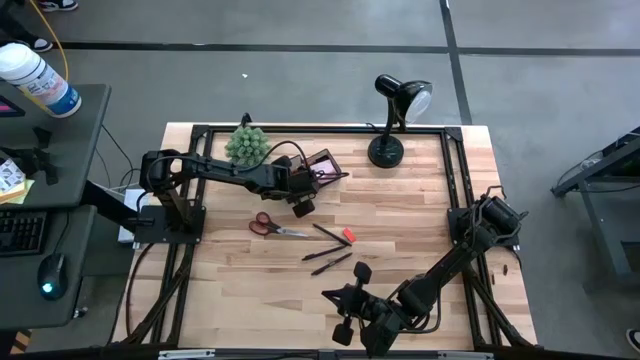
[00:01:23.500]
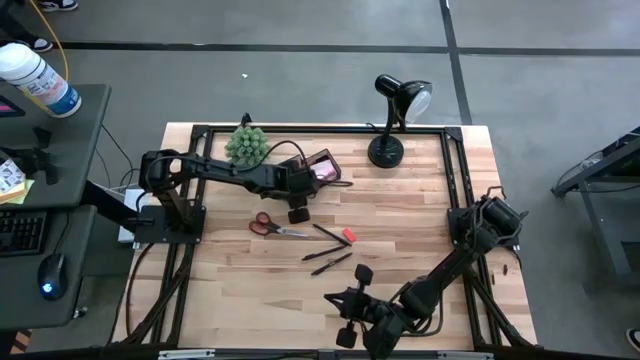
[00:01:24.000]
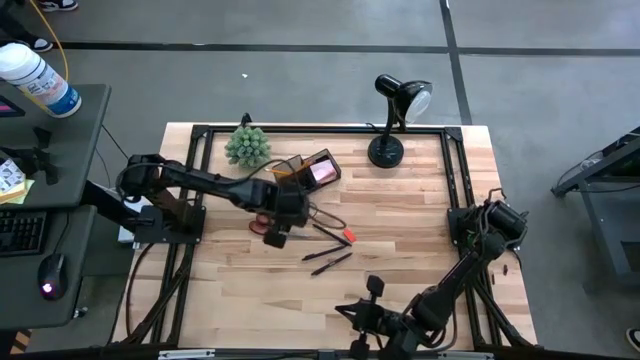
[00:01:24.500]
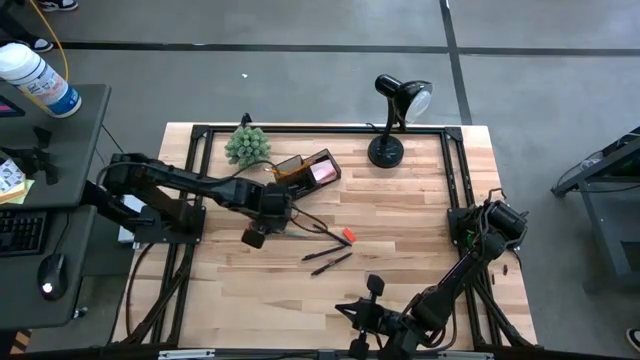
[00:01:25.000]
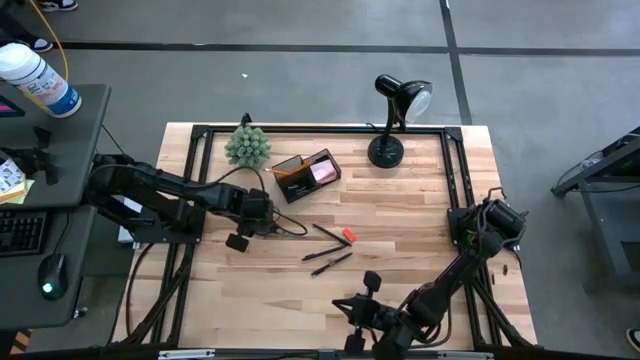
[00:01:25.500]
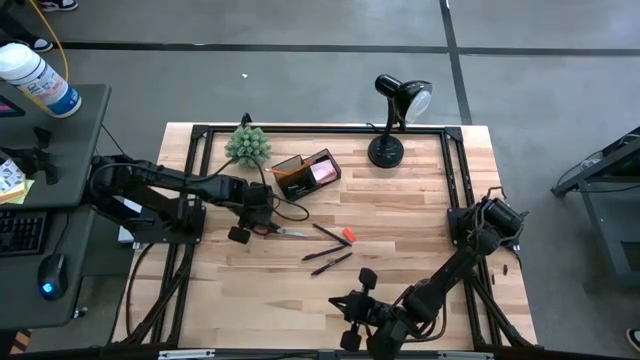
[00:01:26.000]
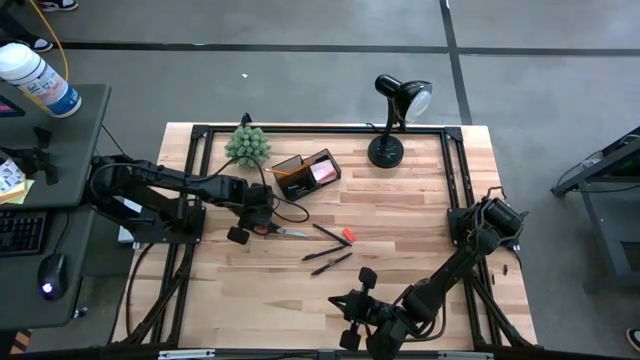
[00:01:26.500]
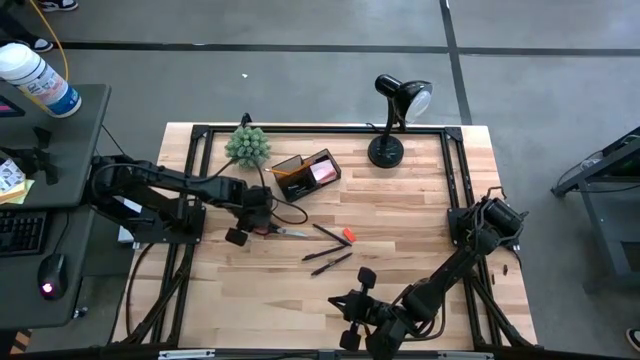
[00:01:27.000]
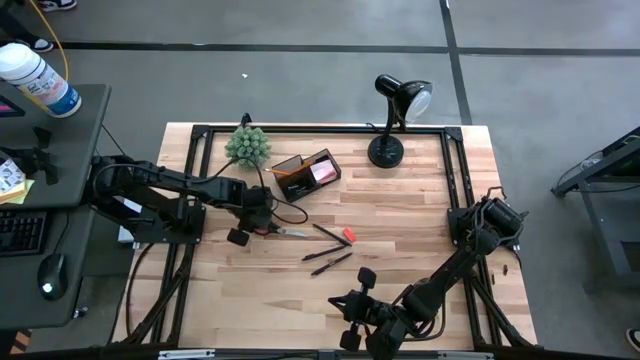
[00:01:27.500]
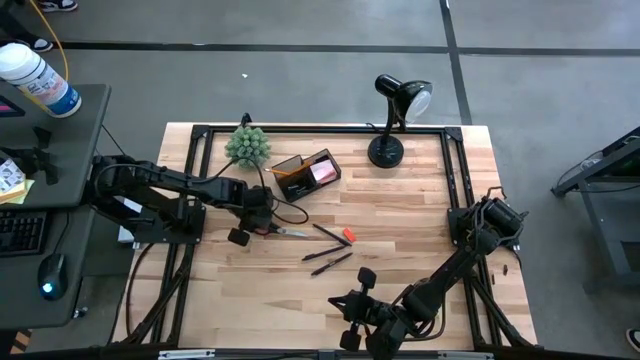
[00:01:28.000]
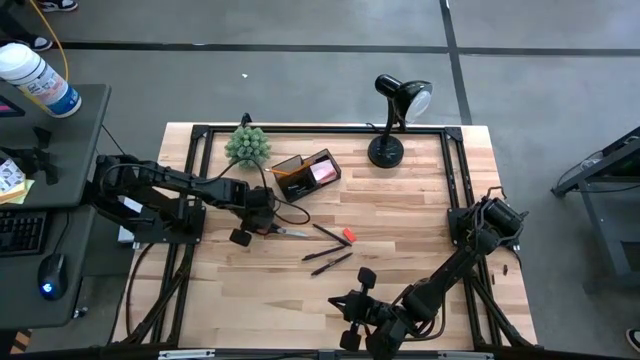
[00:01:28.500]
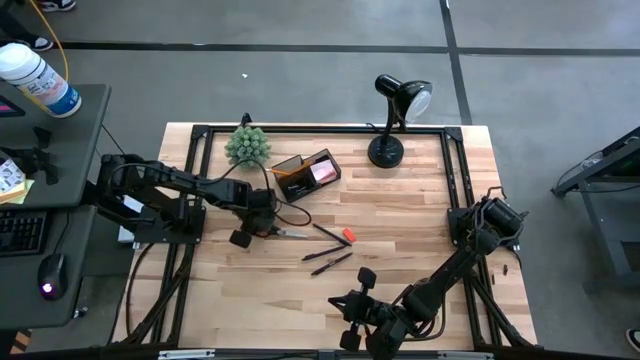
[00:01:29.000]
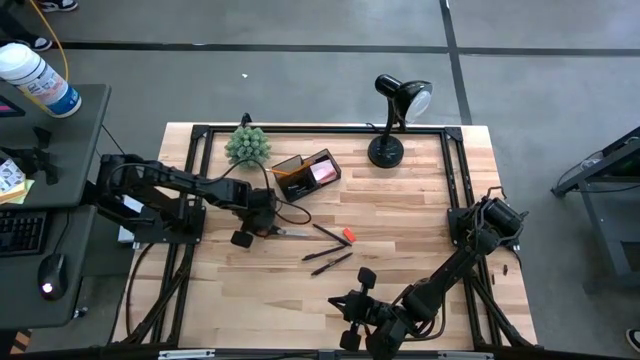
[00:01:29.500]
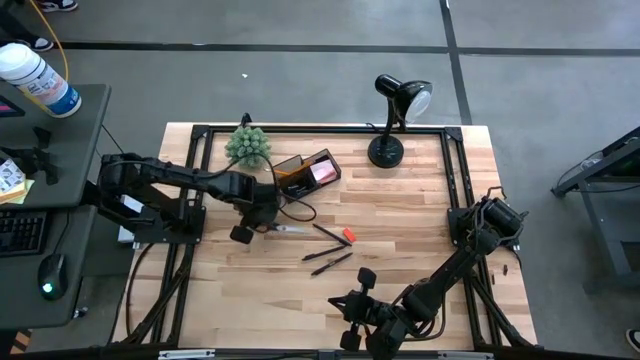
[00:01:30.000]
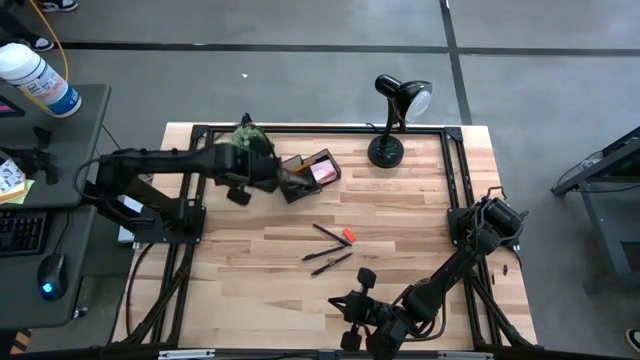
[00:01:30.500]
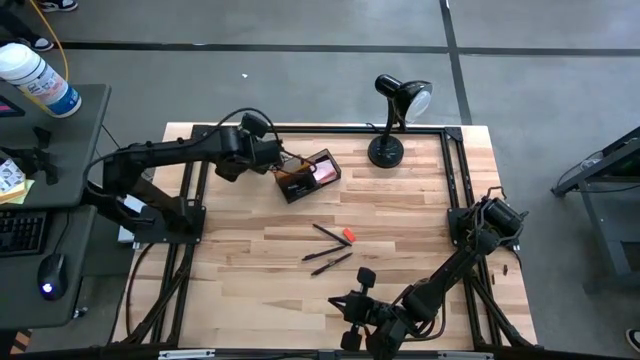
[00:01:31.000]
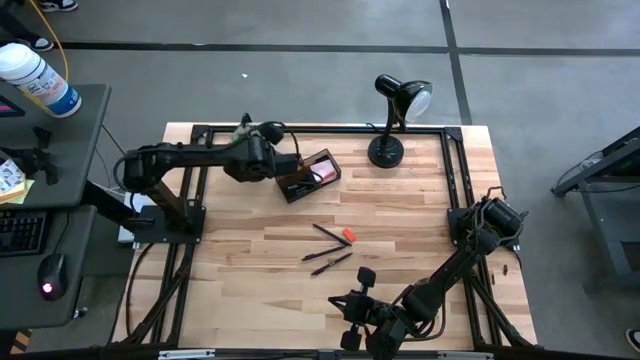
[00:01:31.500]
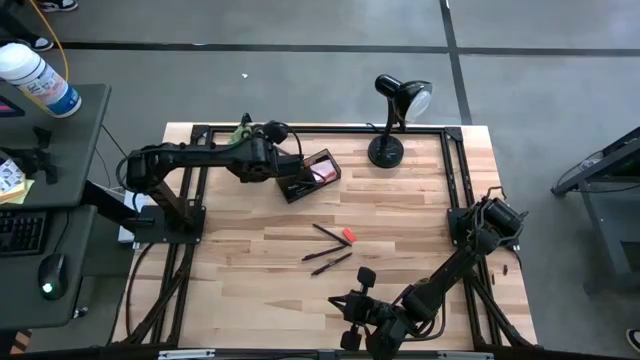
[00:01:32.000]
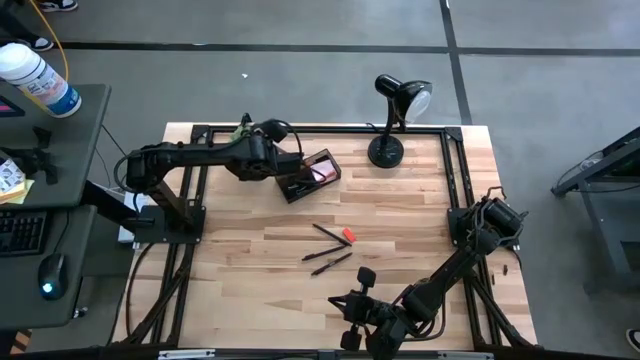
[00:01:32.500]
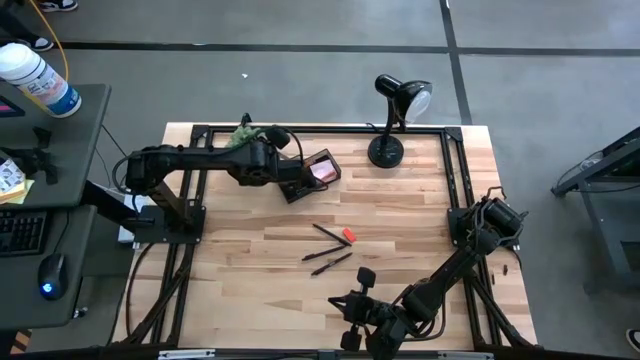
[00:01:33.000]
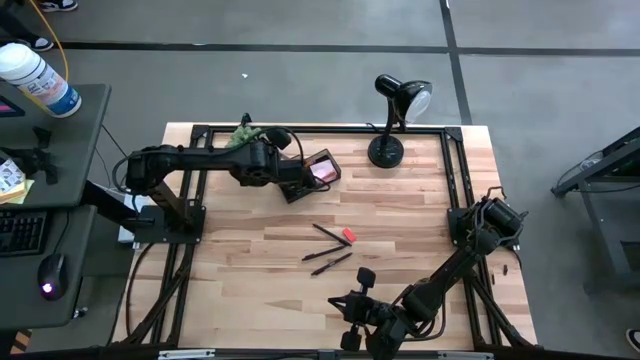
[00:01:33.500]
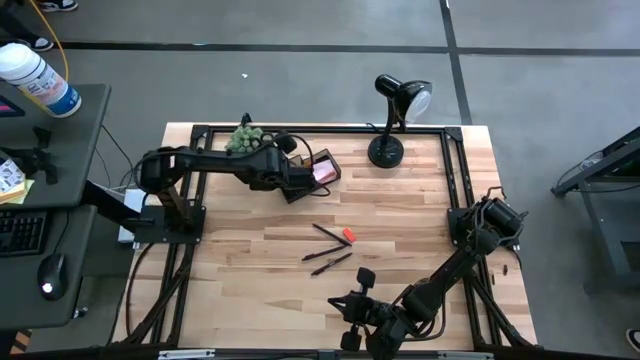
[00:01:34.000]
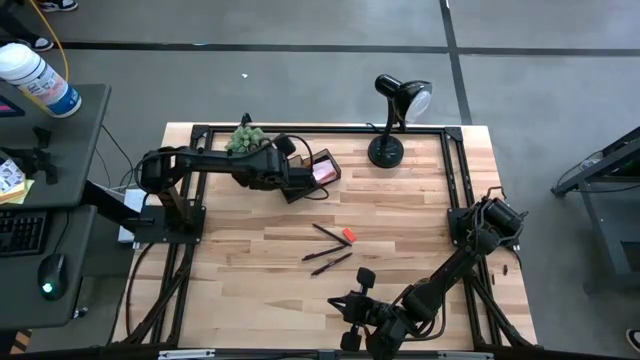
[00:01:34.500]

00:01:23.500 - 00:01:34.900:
Task: Pick and place office supplies into organizer
Put the black scissor into the black desk organizer

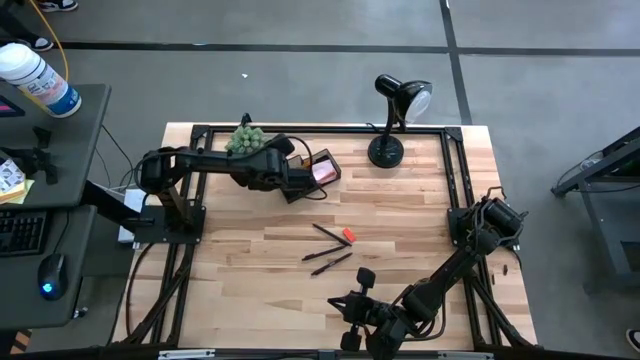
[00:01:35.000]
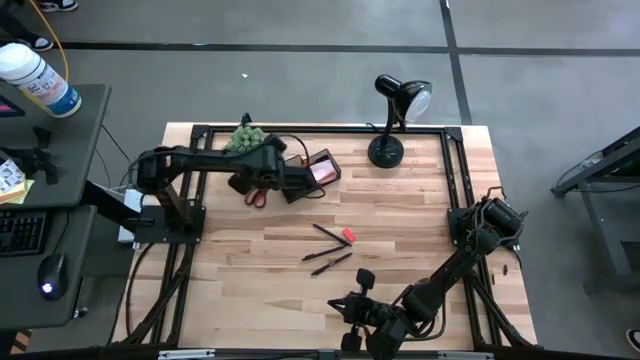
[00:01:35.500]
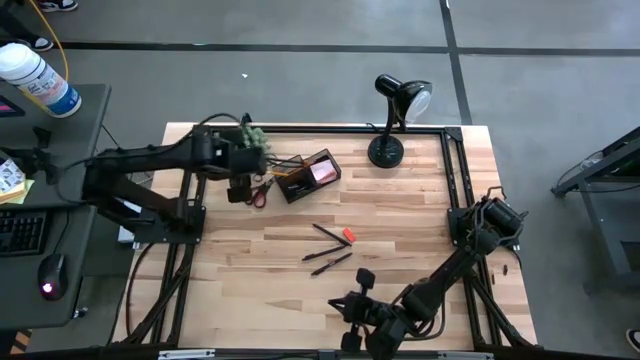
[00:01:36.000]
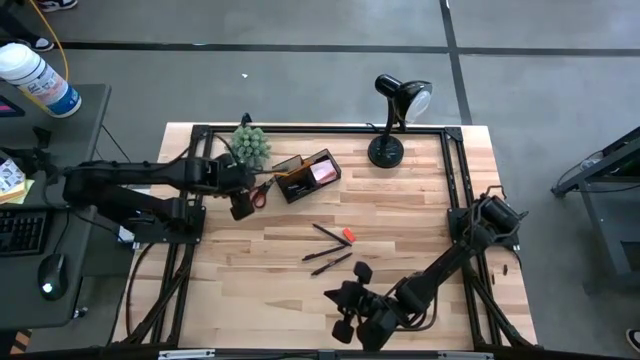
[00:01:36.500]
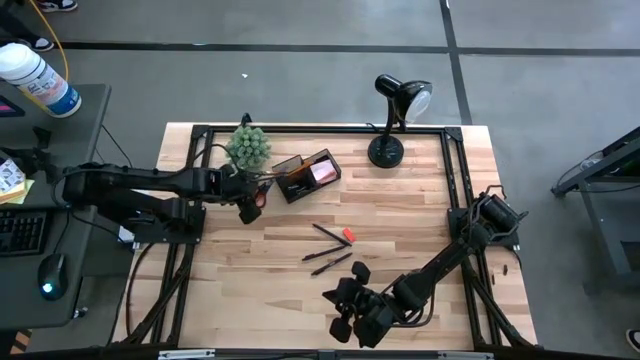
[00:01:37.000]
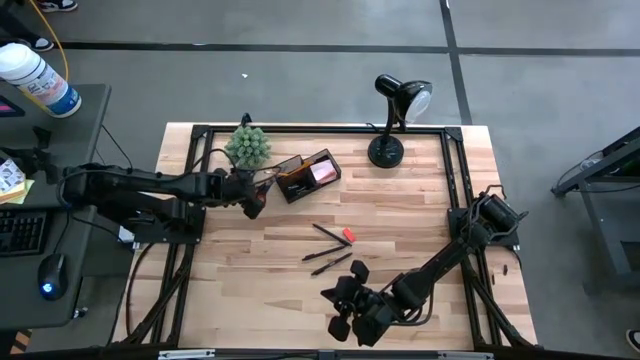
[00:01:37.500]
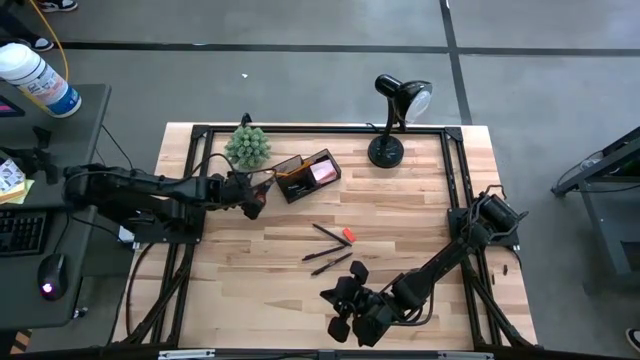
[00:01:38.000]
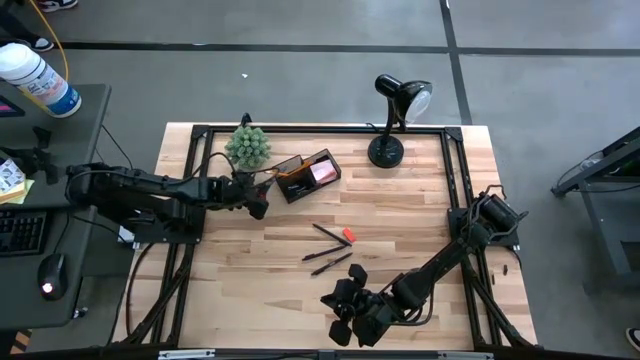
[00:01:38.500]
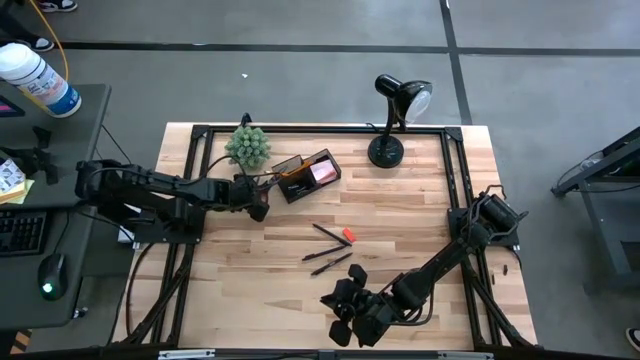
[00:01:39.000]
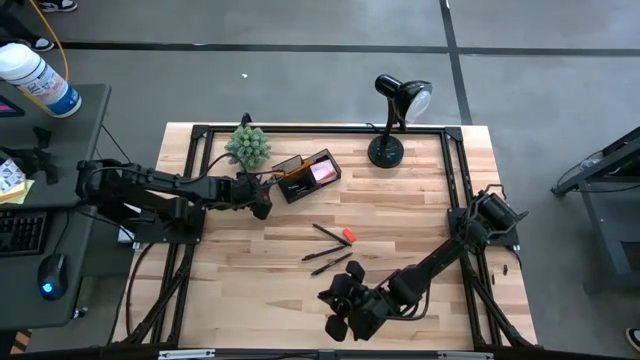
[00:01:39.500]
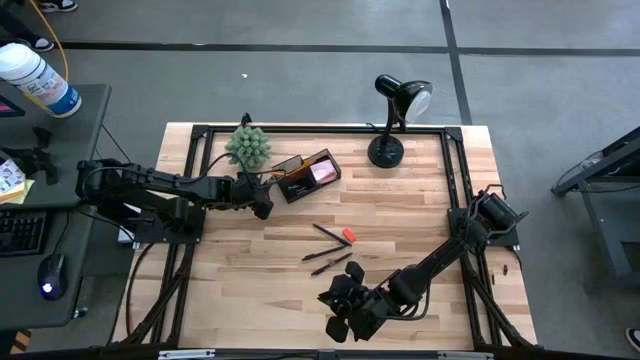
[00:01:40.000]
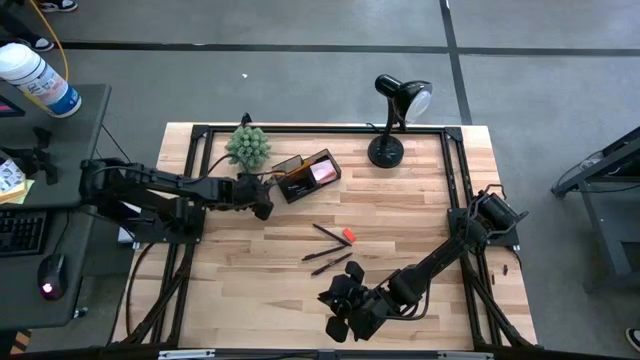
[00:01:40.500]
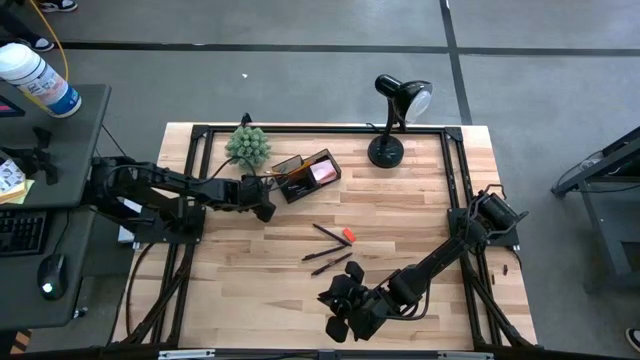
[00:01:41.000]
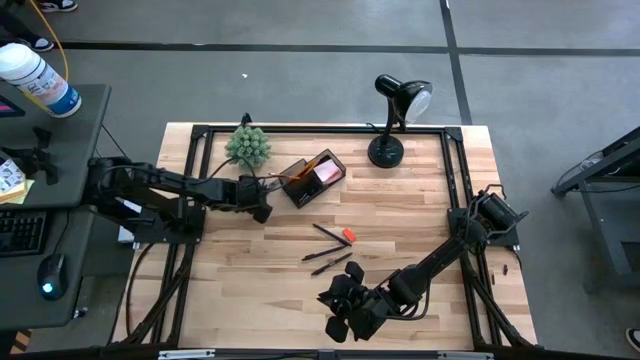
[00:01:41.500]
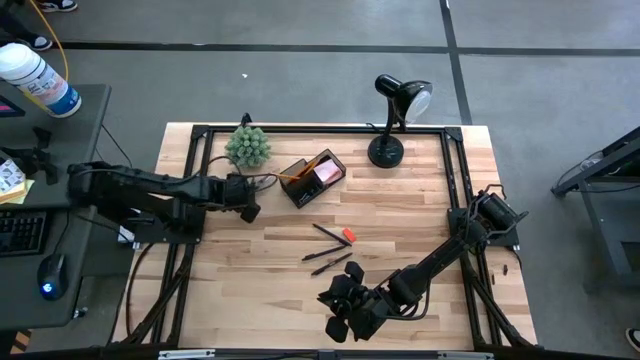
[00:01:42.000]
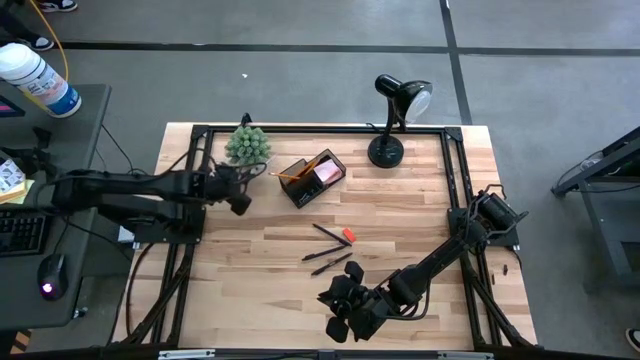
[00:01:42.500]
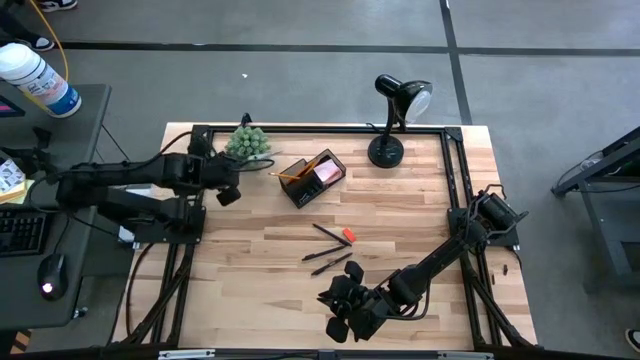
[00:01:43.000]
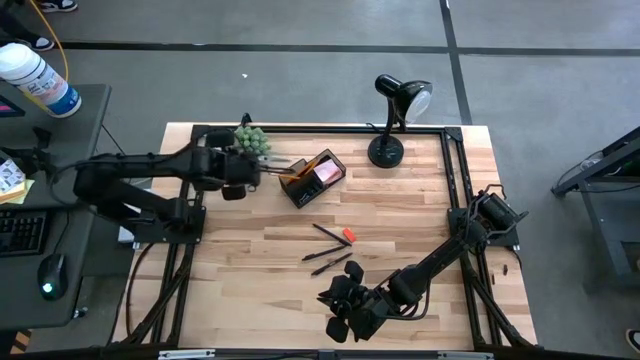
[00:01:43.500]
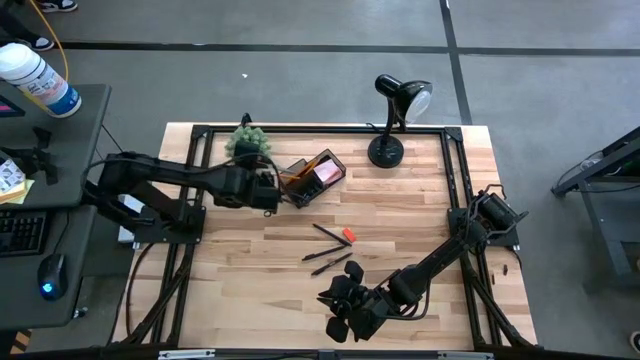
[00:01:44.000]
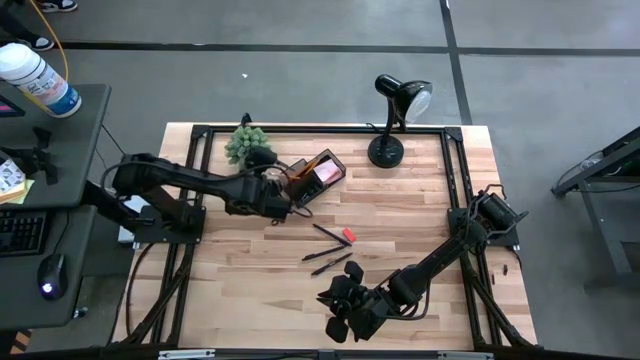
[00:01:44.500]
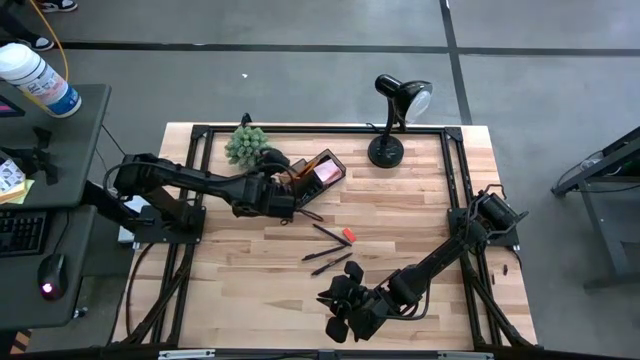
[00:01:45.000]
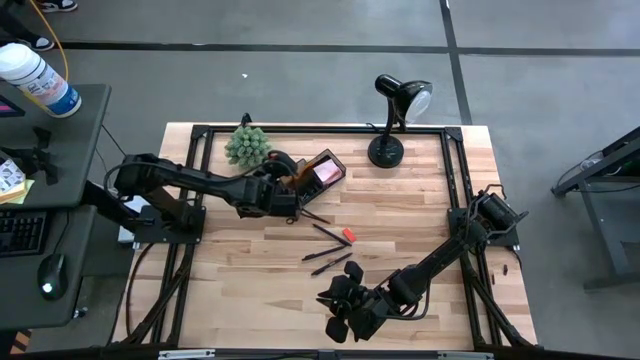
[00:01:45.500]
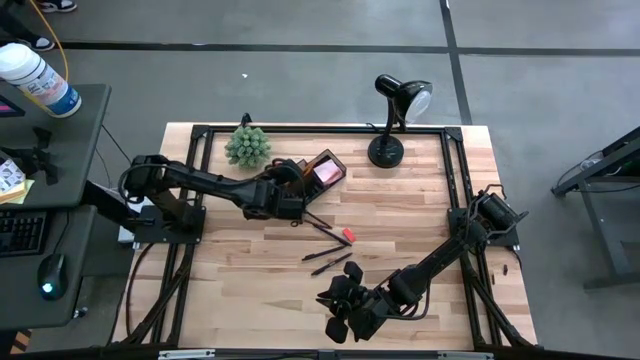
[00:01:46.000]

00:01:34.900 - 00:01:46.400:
Put the black scissor into the black desk organizer
